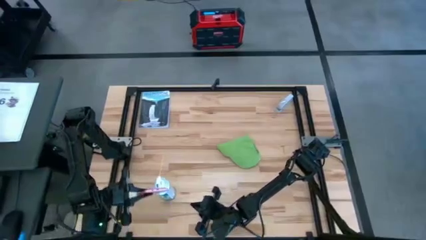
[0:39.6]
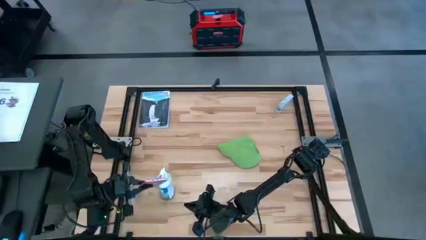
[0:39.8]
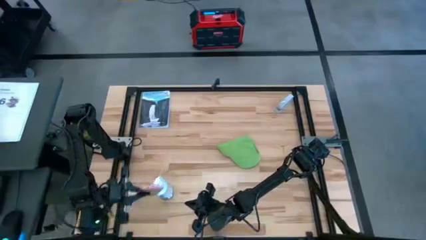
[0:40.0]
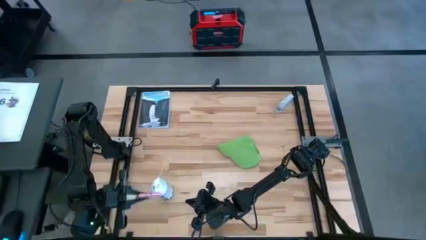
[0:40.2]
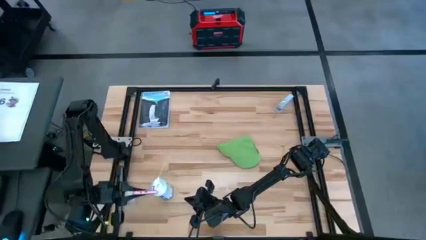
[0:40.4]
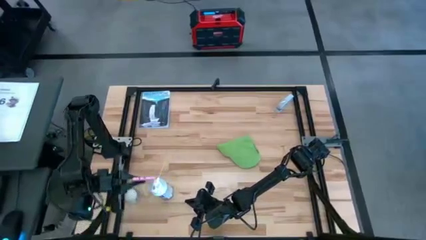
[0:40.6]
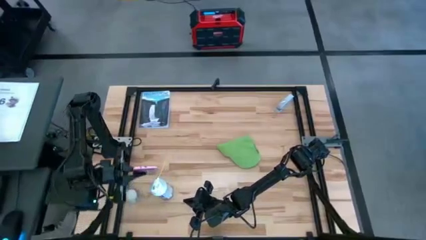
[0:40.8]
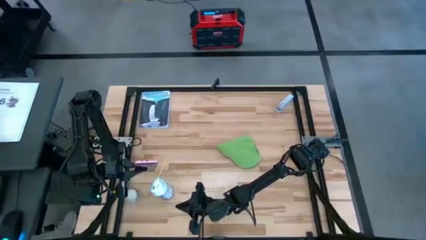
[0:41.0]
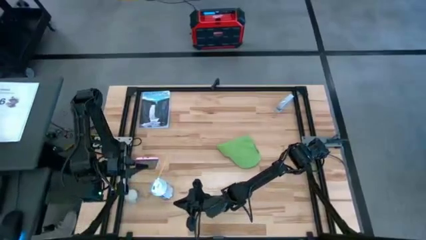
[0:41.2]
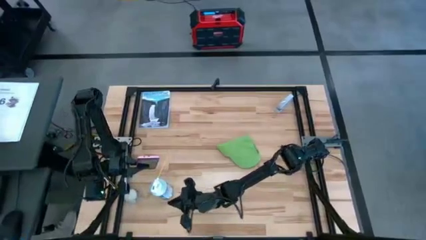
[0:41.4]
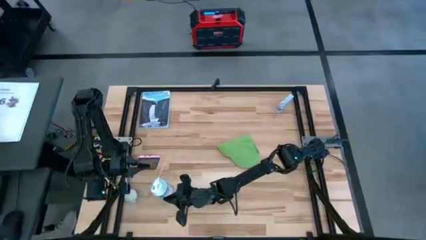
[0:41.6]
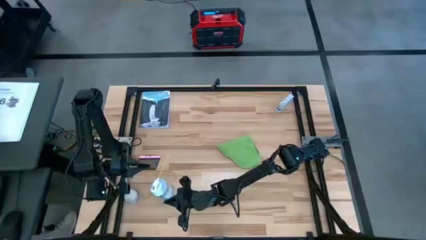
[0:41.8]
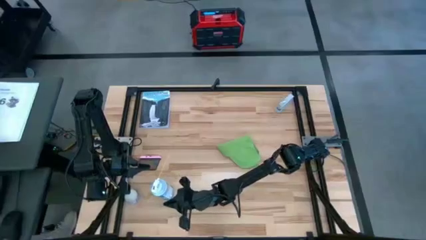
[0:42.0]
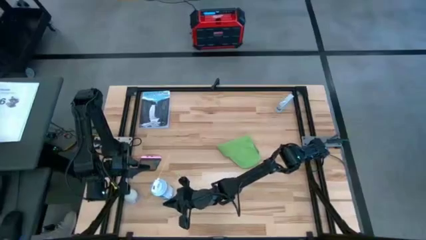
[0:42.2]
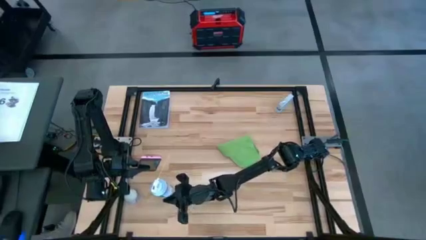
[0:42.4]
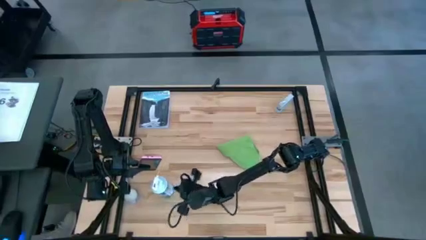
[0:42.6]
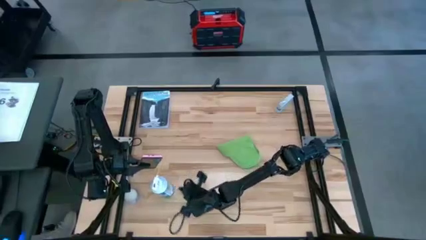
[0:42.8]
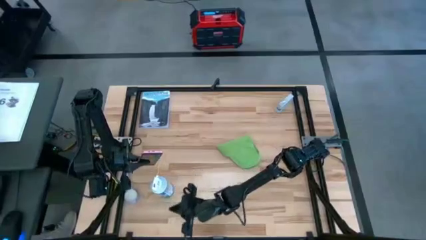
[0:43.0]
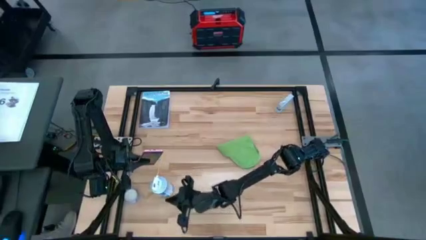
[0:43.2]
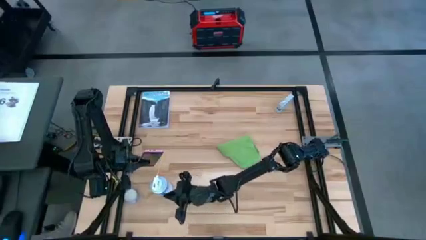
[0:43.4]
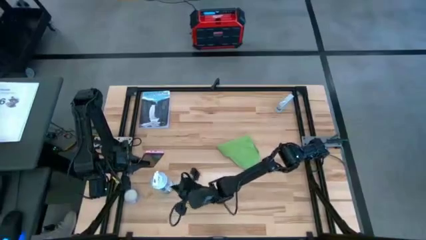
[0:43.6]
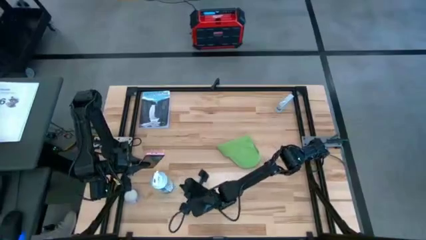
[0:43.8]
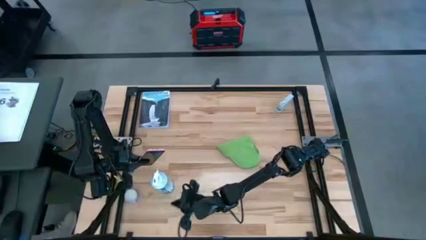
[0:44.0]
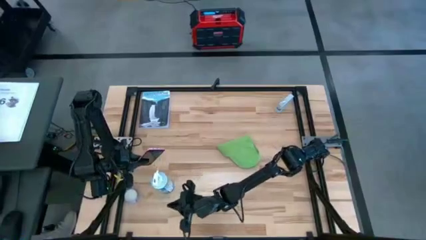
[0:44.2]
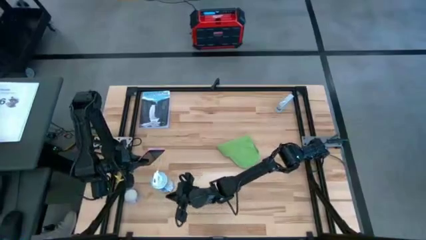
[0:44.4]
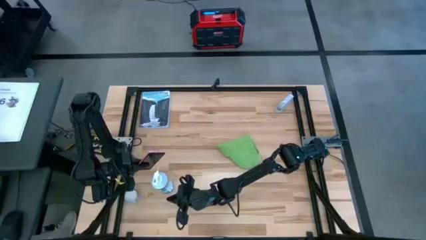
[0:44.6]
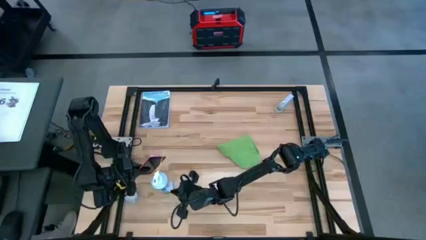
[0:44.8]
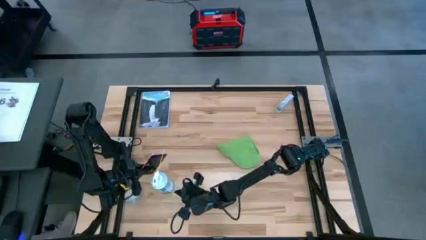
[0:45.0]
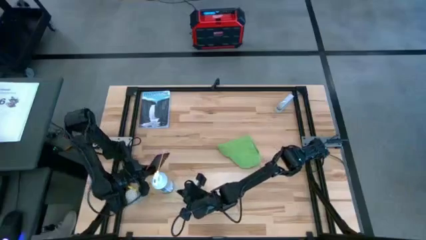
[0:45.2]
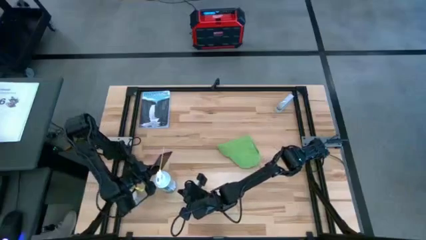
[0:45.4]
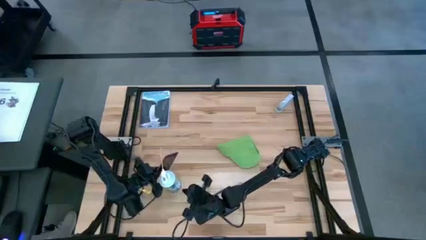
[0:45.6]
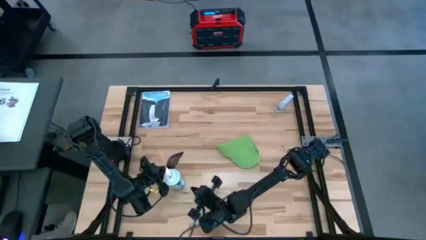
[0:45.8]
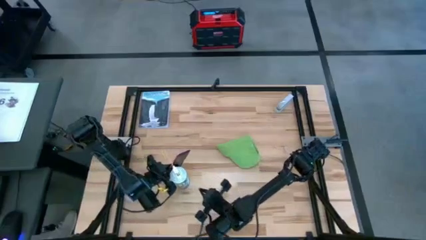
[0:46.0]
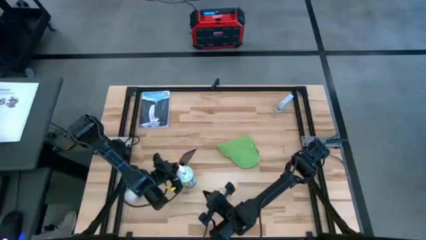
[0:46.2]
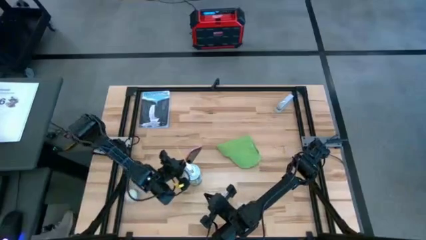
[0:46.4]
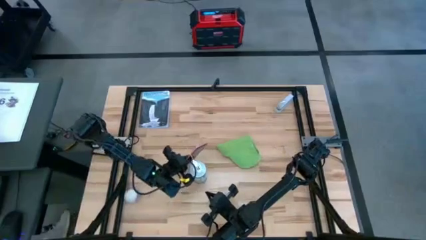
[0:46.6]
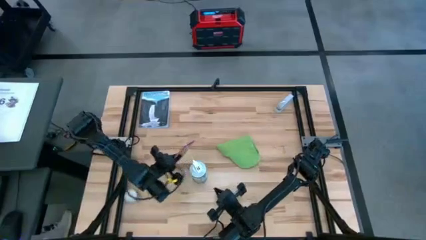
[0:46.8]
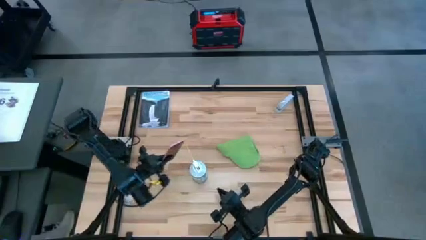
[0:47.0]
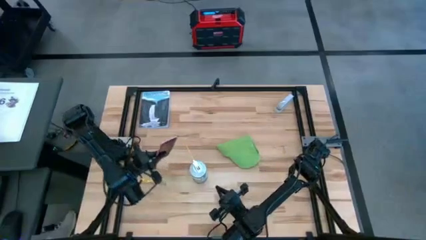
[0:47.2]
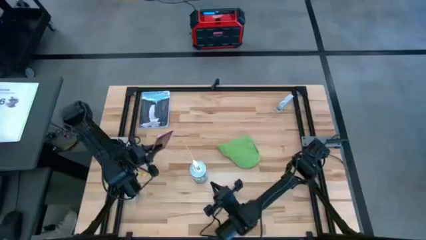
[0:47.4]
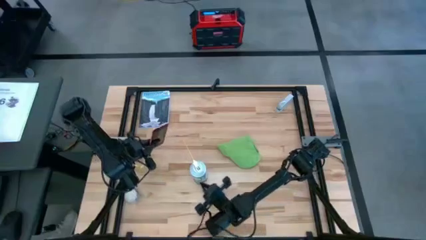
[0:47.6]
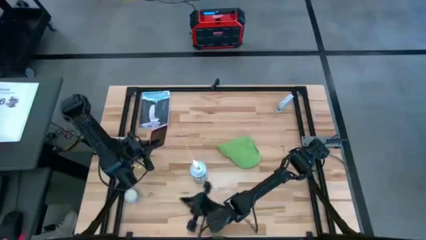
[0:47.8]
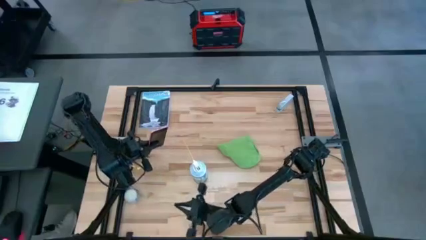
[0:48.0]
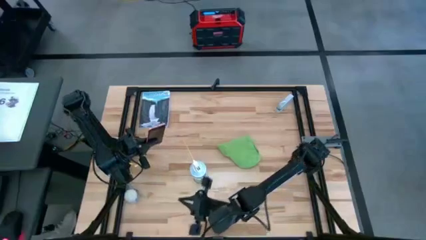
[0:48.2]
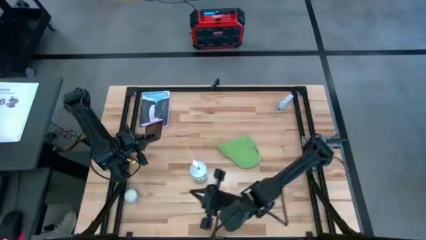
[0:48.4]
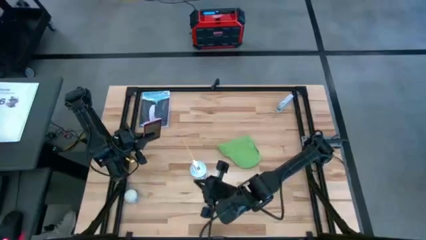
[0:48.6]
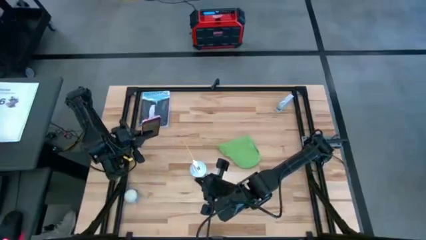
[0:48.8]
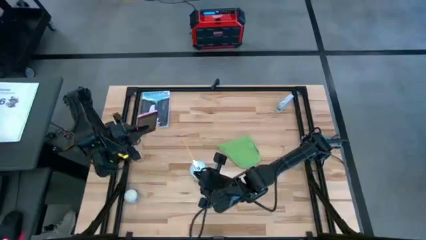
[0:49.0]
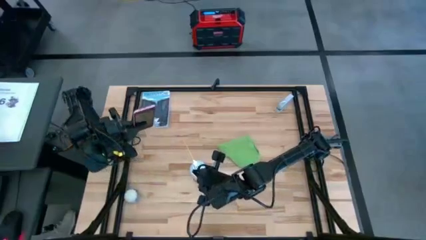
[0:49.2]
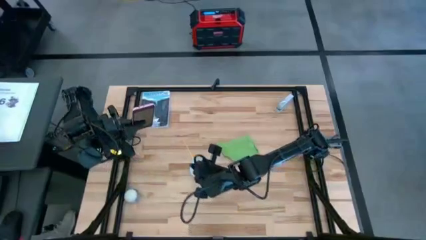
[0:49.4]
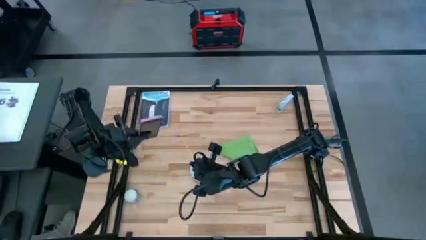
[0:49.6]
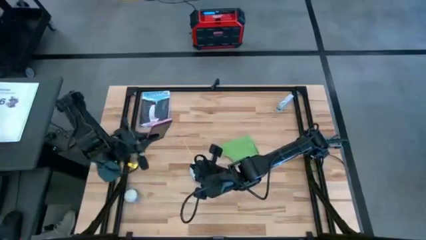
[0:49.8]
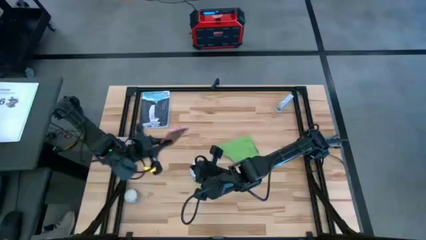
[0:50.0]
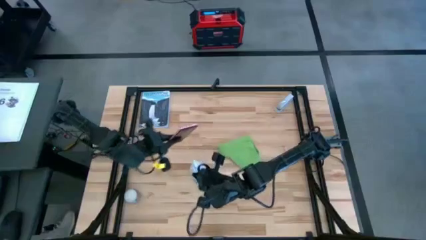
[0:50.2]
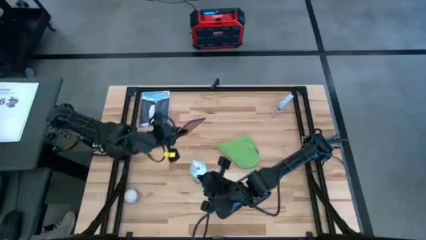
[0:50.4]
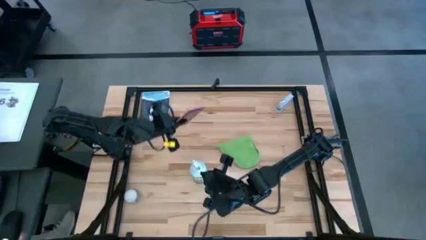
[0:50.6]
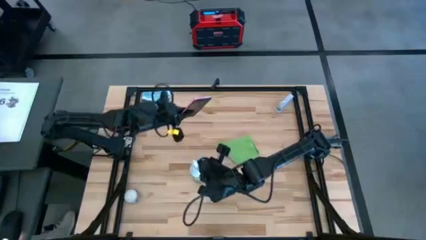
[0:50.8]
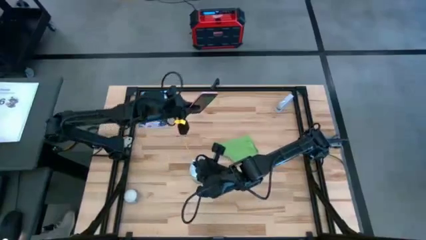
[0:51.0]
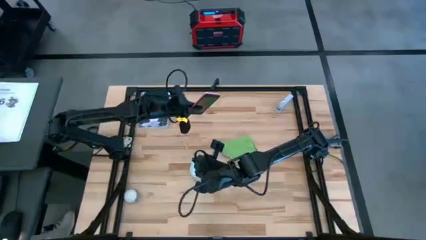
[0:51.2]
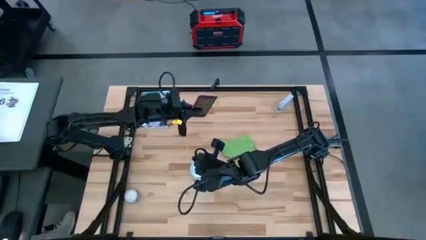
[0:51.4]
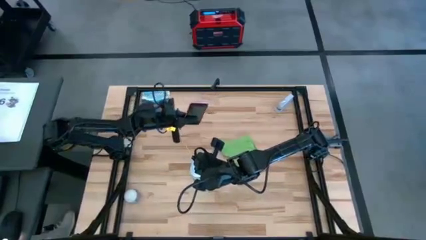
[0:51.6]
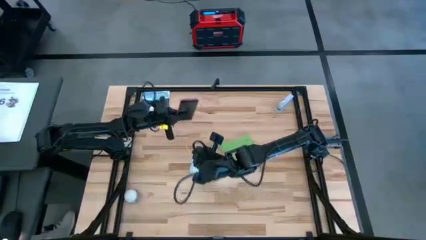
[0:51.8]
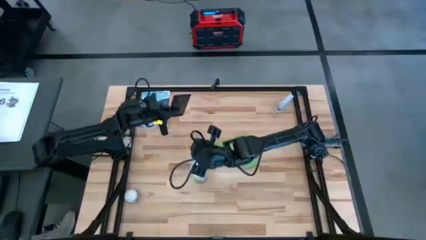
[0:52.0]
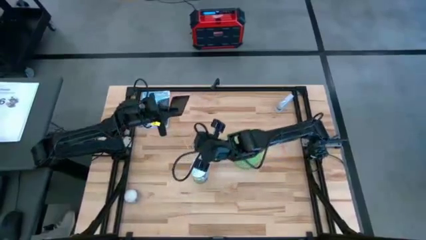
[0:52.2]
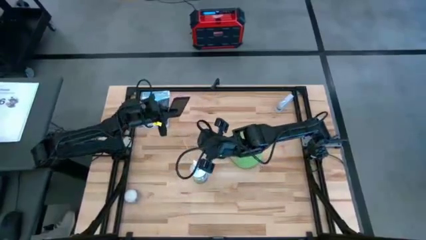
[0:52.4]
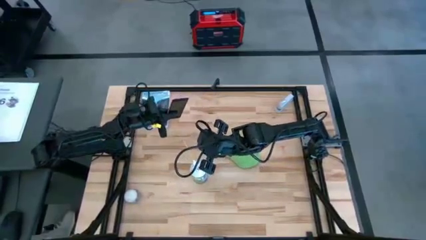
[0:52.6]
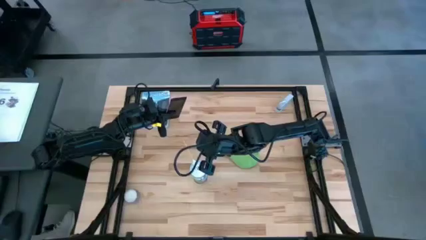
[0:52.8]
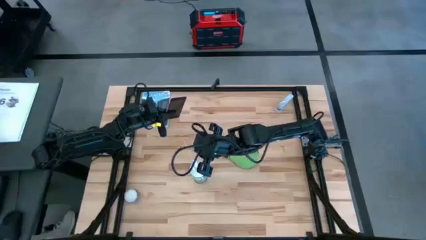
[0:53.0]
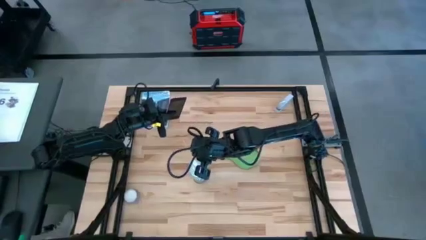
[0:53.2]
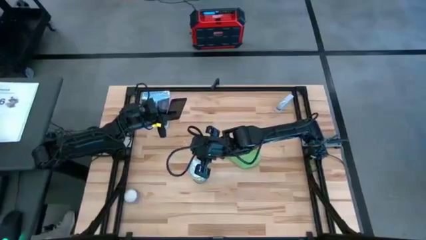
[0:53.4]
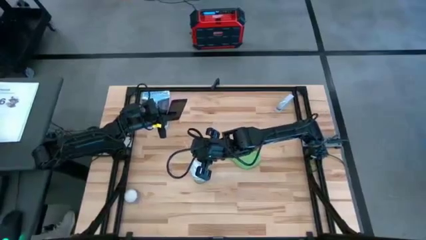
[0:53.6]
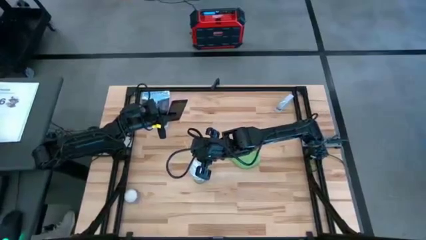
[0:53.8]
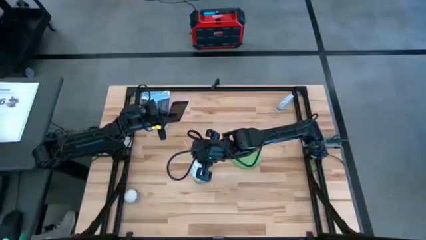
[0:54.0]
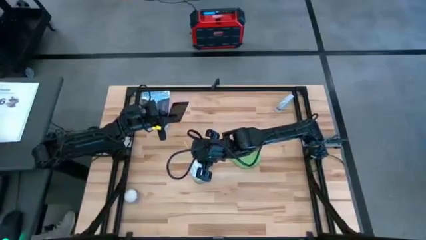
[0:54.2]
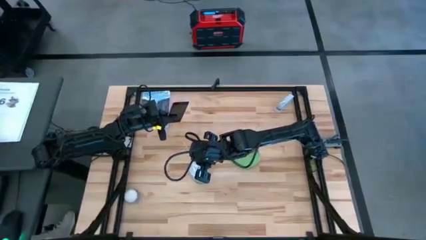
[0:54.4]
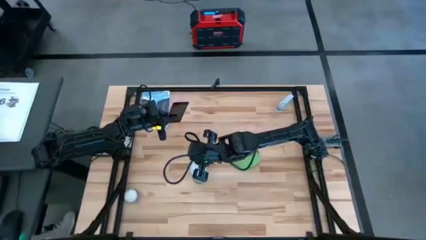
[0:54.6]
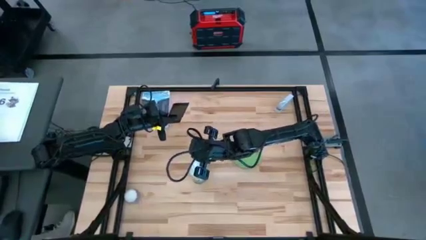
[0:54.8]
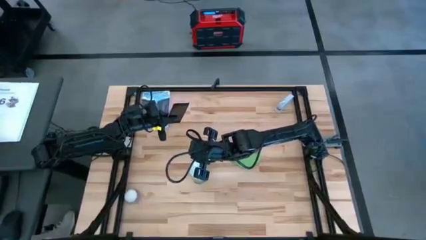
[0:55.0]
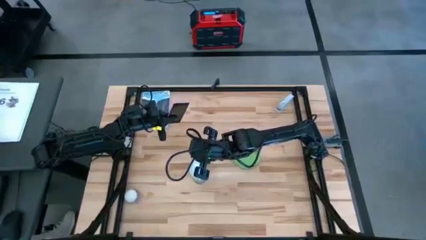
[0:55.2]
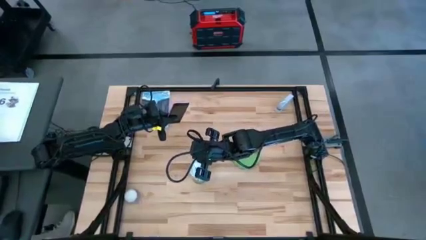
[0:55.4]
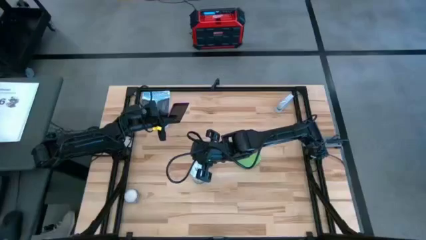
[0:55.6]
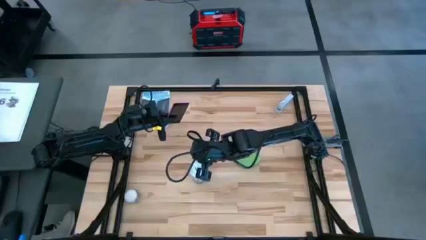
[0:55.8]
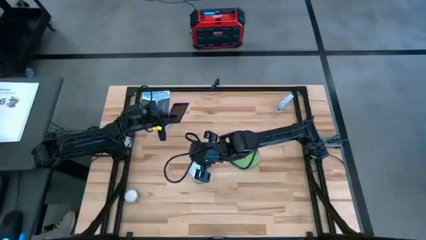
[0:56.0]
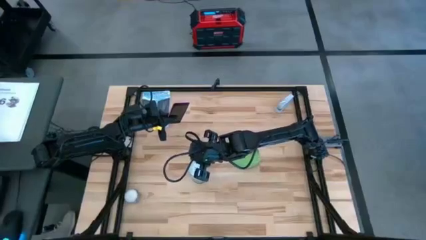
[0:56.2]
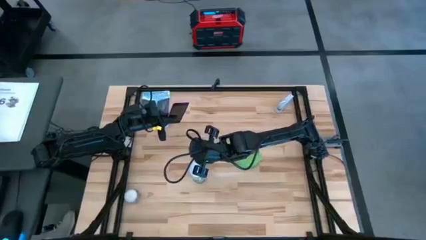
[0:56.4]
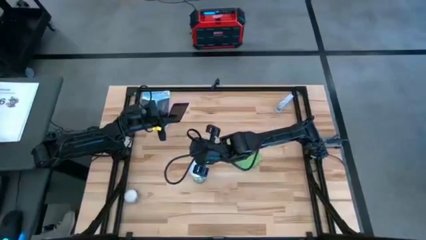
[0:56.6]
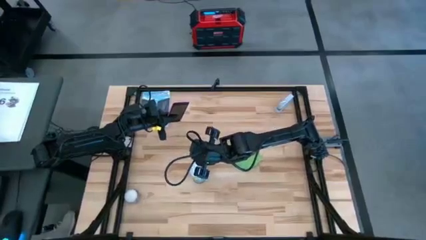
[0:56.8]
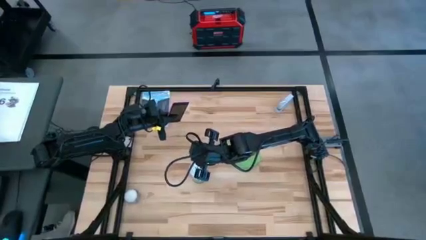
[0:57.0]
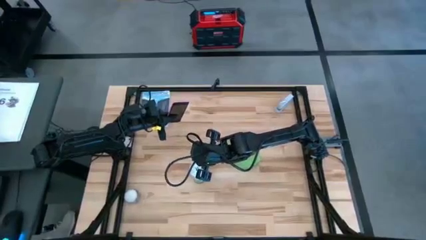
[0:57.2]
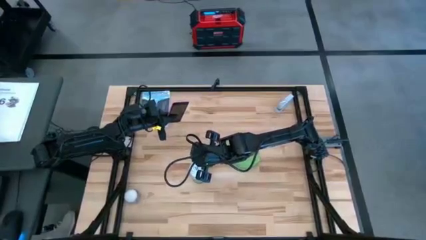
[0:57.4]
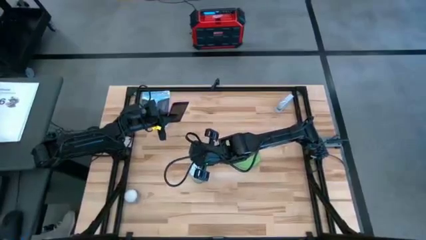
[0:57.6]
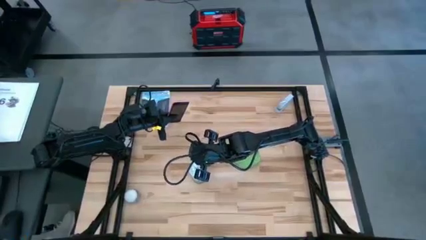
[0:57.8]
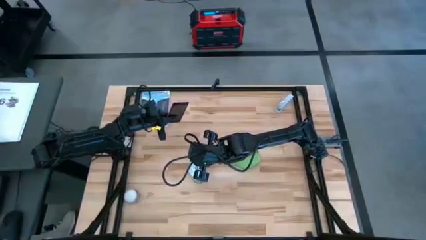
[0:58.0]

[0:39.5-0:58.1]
Task: Apply microfiber cloth
Spray the front of the black cellphone with the white spray bottle
